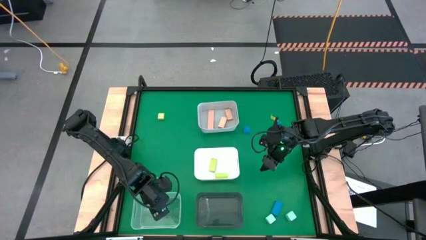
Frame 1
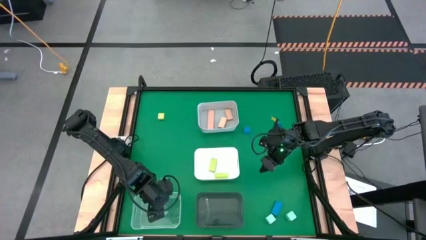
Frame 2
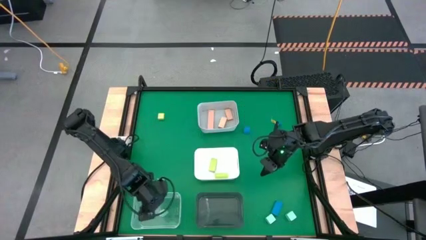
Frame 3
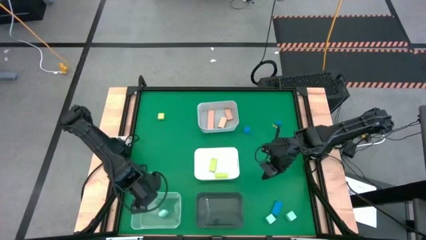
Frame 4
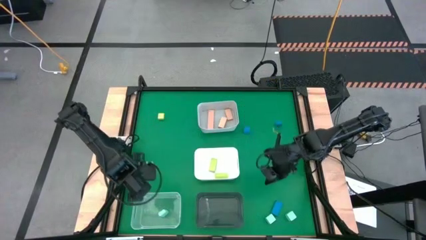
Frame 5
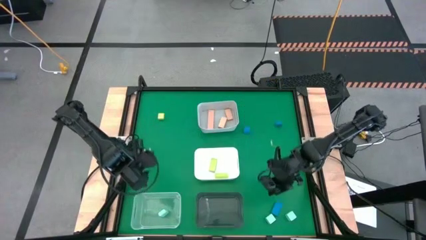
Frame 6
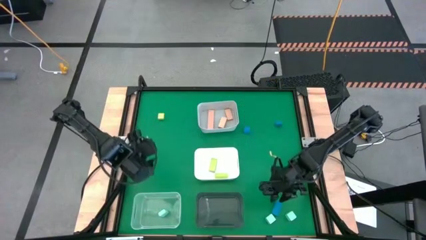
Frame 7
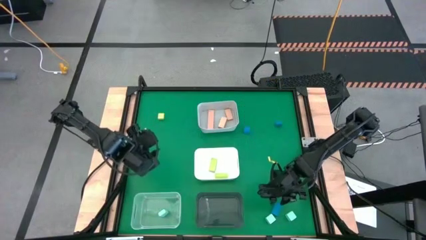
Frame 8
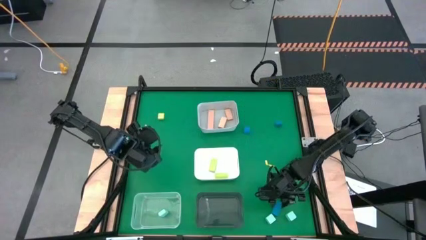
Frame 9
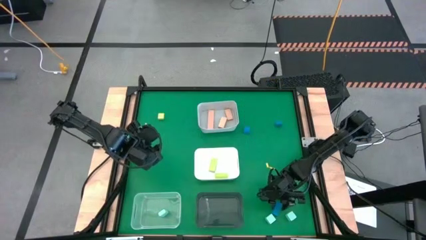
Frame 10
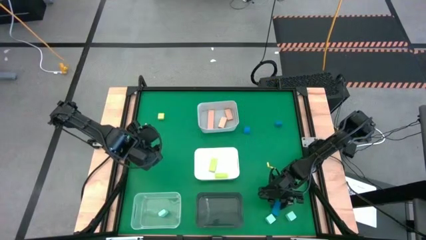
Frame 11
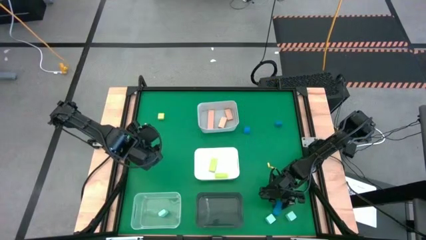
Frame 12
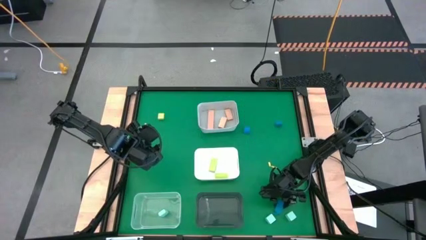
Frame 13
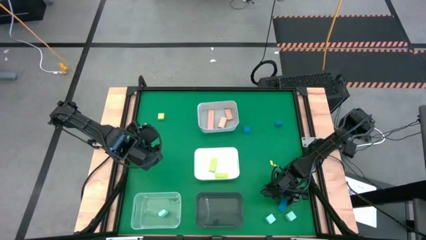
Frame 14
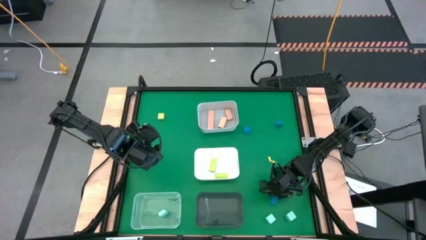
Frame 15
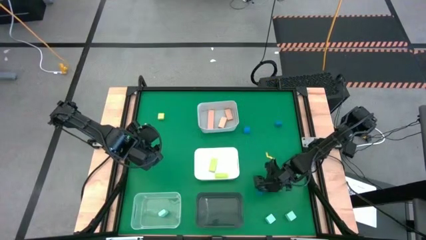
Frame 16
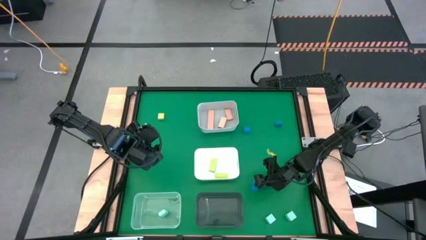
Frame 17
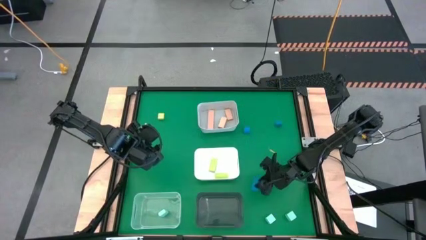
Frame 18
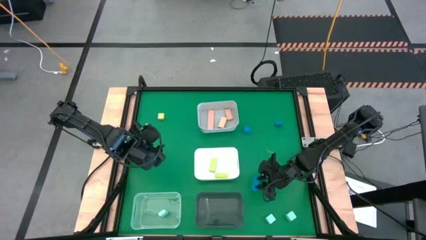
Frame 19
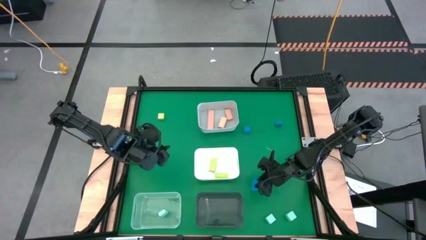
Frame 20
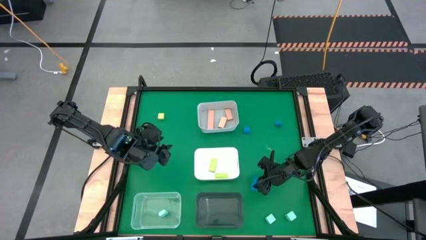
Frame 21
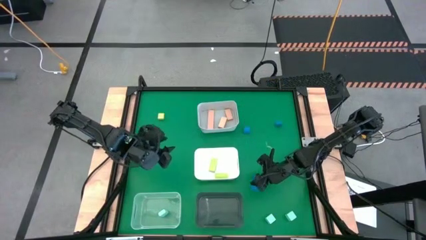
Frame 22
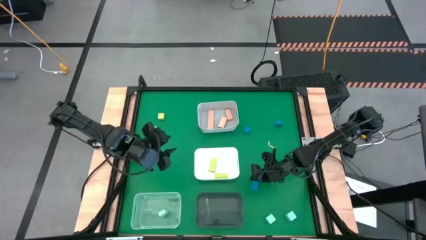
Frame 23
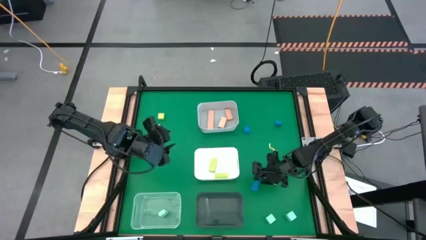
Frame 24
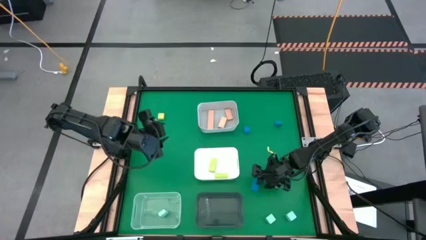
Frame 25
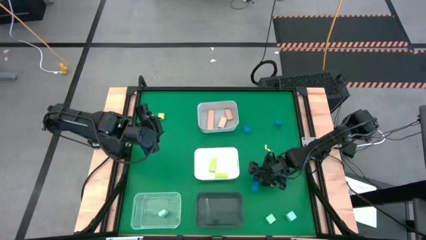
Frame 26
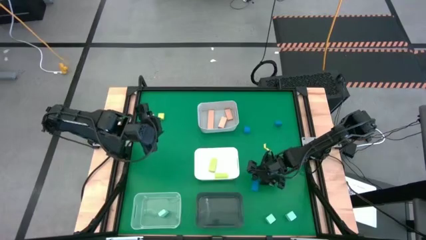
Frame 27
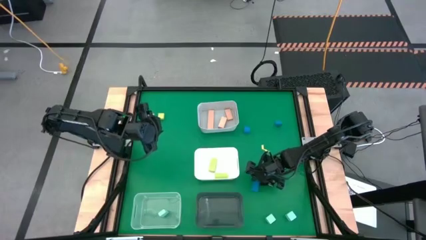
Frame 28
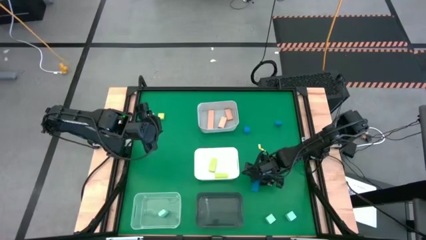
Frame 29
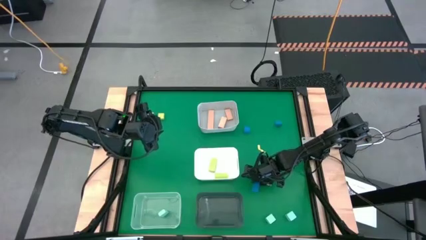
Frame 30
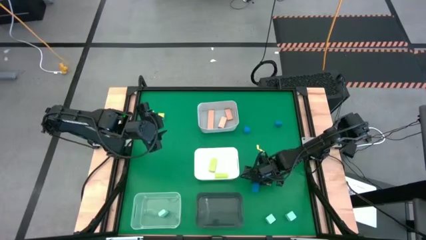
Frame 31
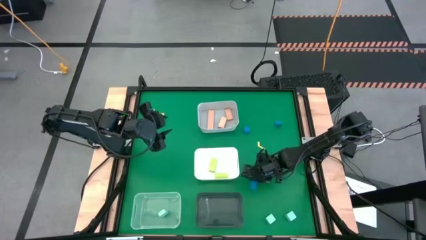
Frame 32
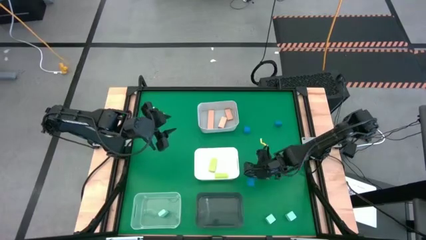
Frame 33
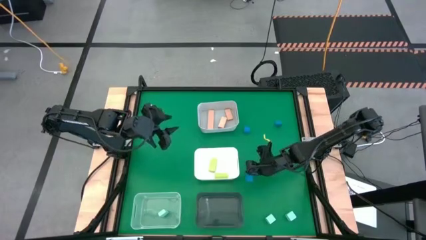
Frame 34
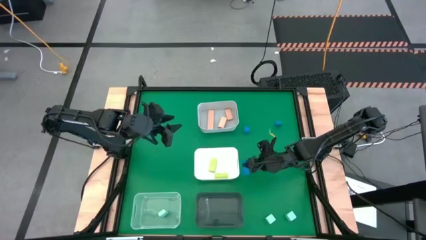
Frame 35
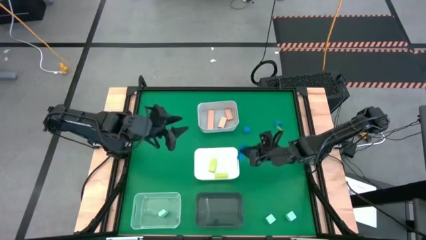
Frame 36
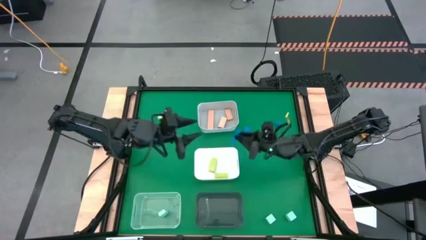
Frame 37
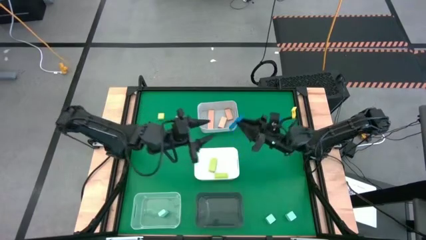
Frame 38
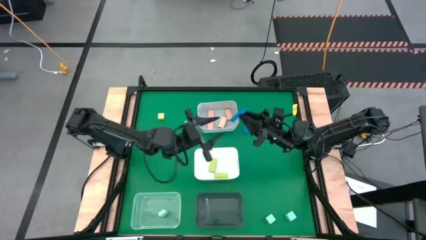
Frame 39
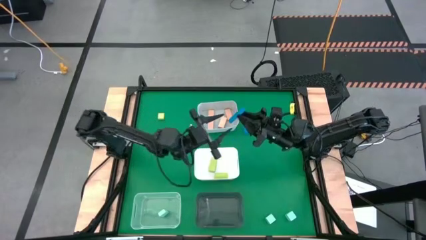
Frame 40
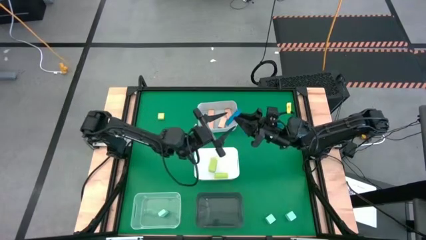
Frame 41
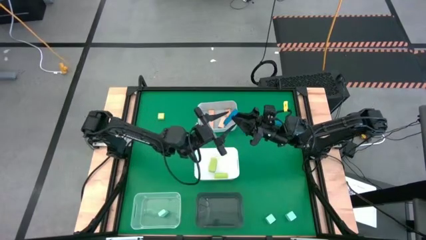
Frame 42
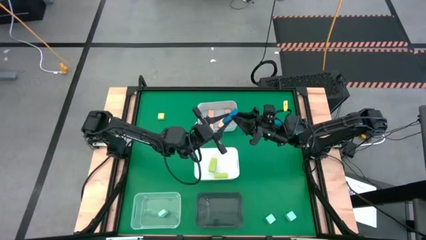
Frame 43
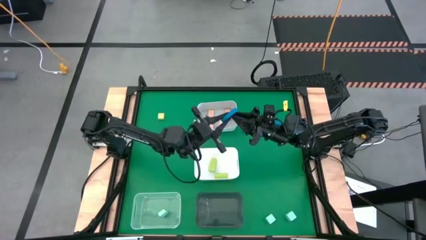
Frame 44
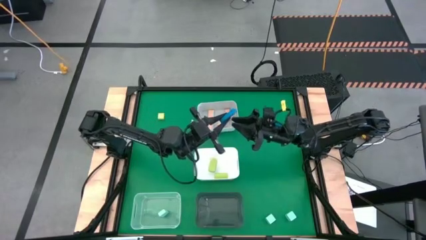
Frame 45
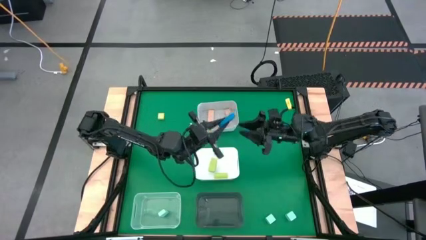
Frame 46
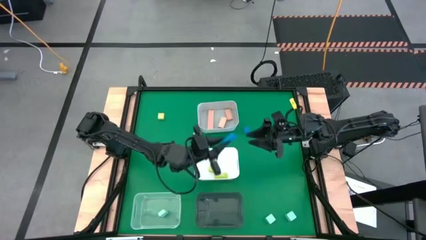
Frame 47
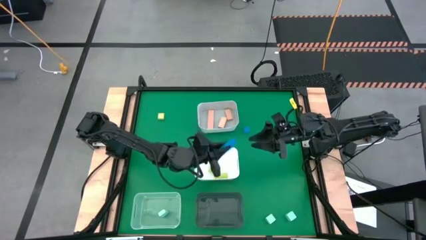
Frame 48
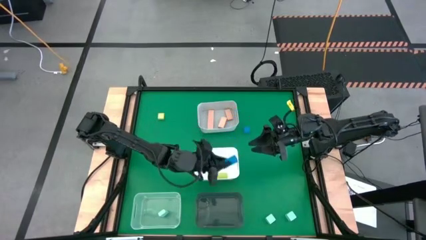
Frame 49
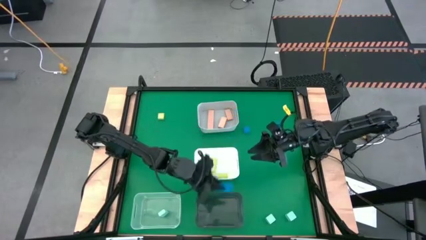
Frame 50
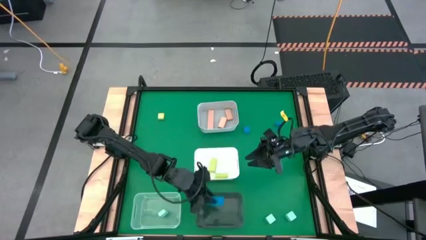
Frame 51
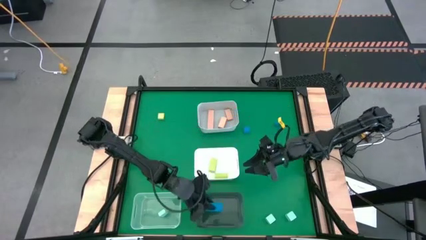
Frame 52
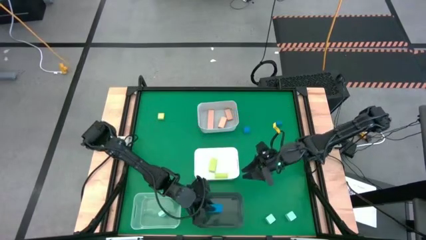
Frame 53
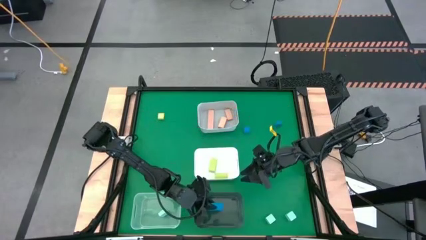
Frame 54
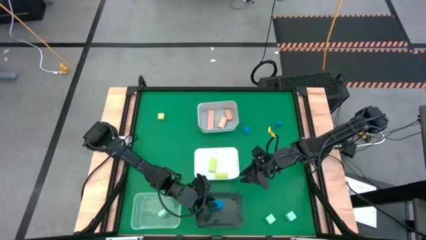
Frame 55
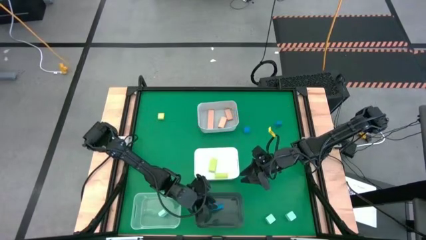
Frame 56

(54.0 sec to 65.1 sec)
Task: Sort & place blocks by color
Put the bottom blue block into the black bin

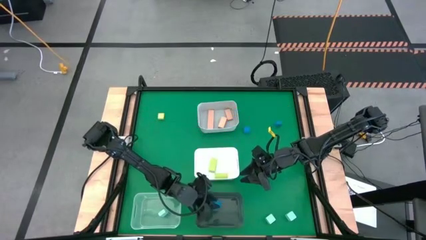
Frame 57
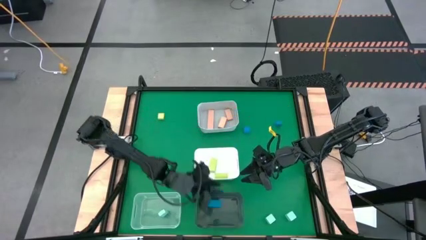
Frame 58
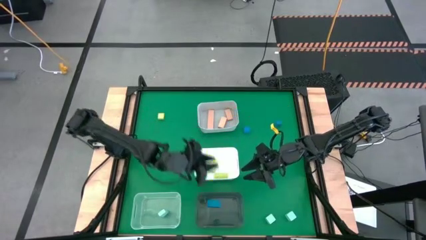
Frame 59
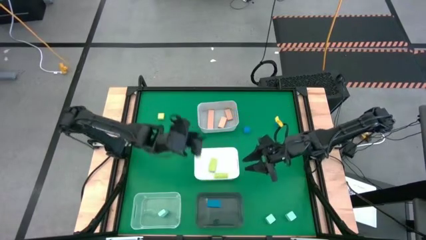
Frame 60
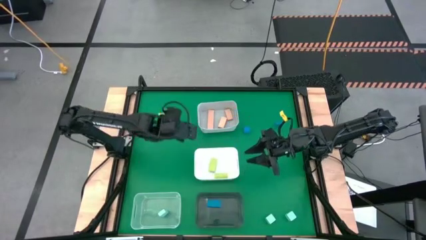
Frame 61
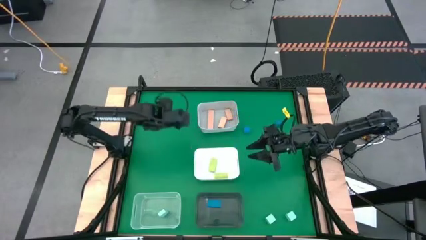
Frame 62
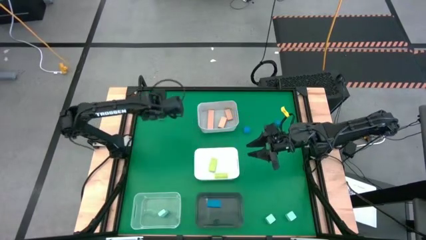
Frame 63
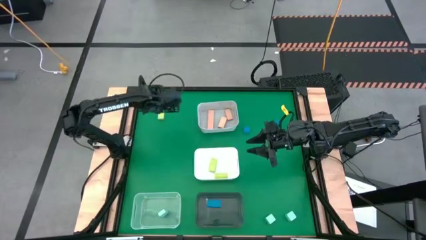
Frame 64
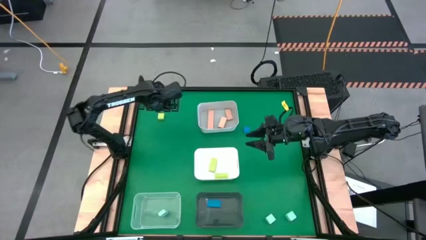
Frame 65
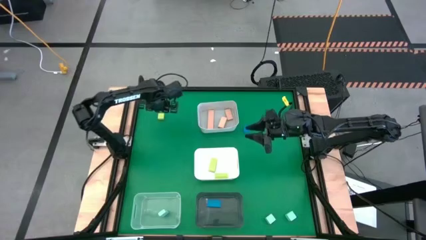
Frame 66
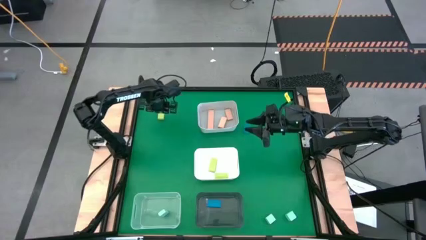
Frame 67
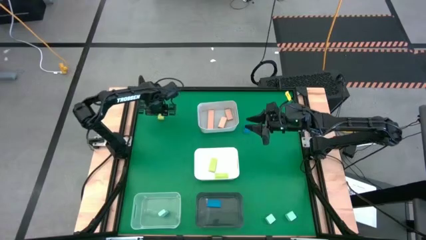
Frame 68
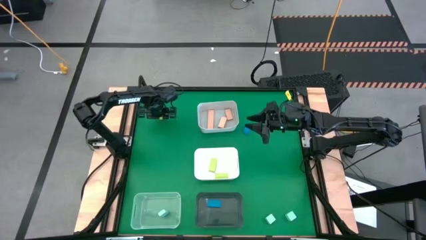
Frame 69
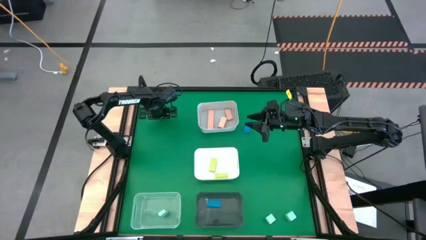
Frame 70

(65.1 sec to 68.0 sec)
Put the green block into the white bin
